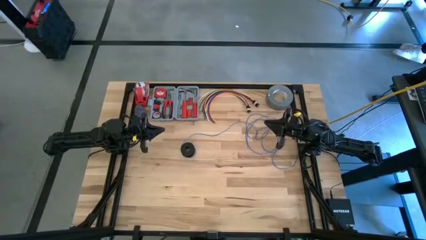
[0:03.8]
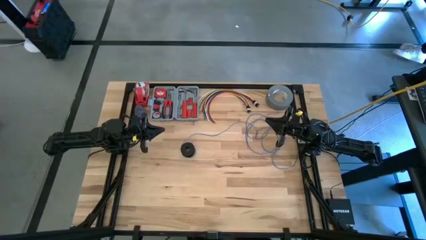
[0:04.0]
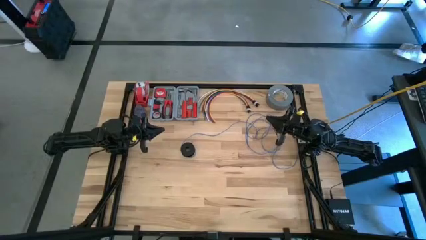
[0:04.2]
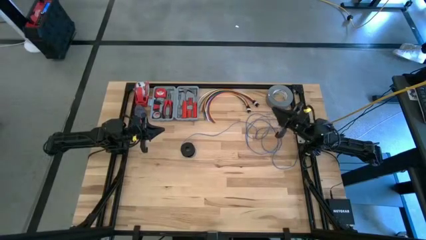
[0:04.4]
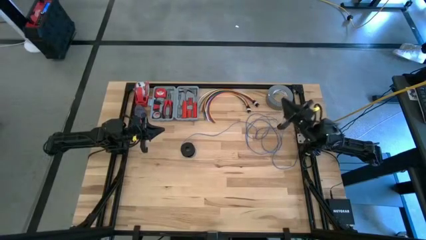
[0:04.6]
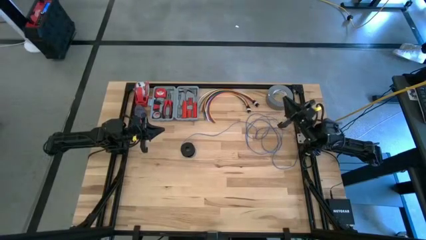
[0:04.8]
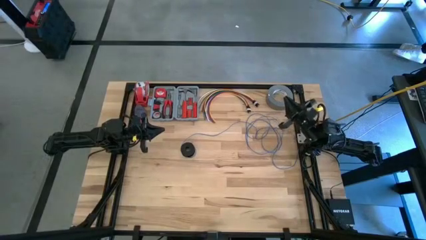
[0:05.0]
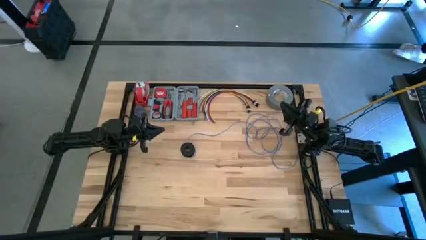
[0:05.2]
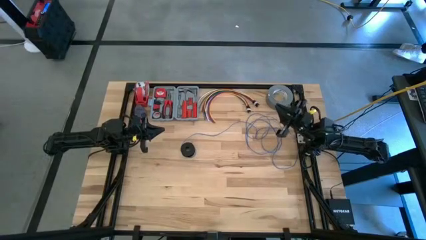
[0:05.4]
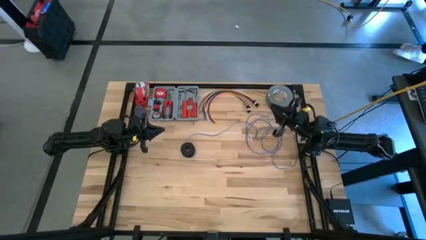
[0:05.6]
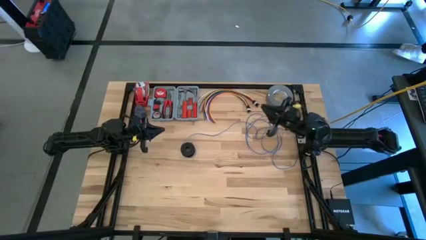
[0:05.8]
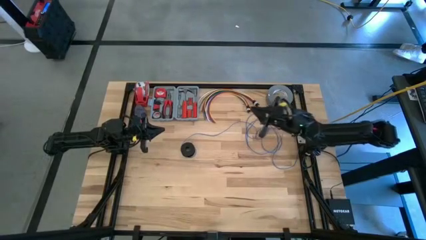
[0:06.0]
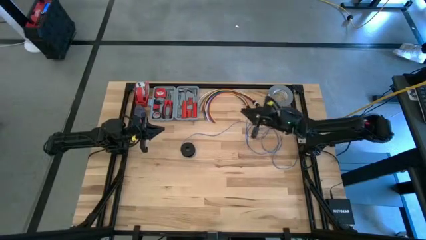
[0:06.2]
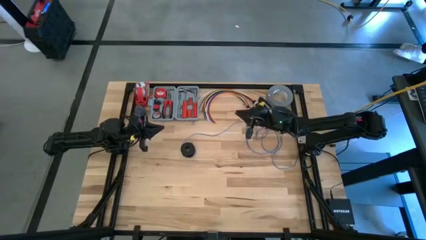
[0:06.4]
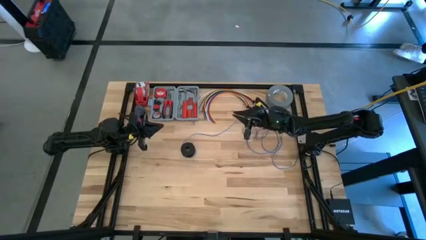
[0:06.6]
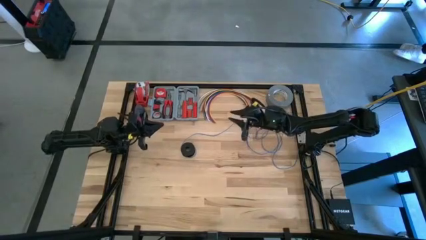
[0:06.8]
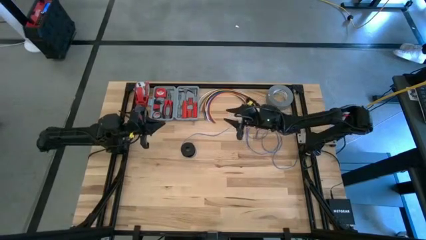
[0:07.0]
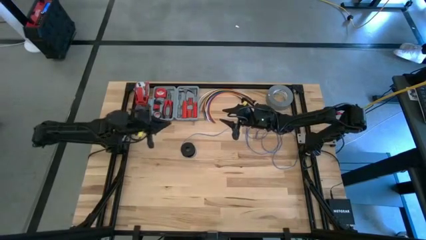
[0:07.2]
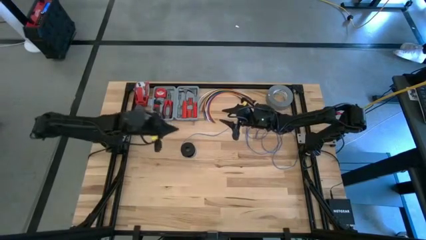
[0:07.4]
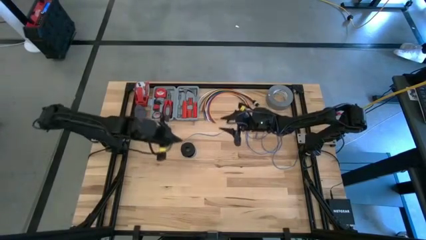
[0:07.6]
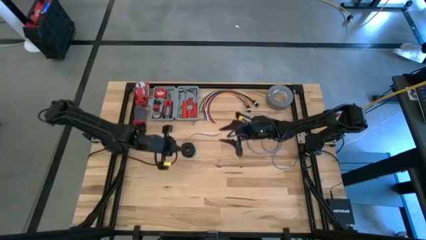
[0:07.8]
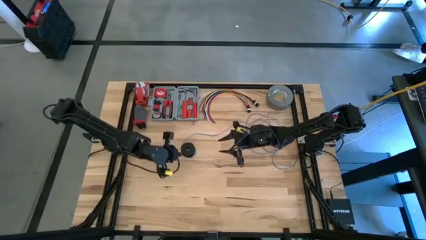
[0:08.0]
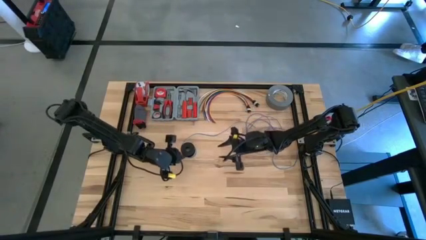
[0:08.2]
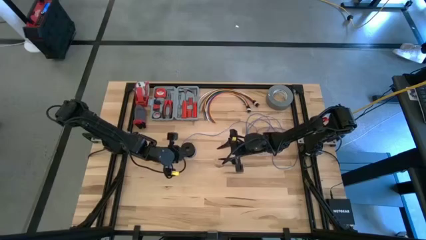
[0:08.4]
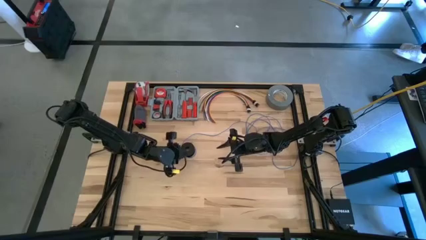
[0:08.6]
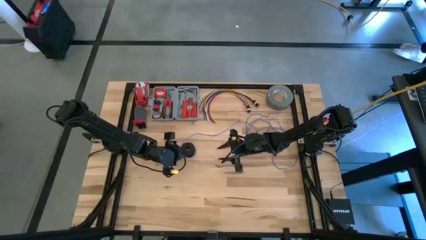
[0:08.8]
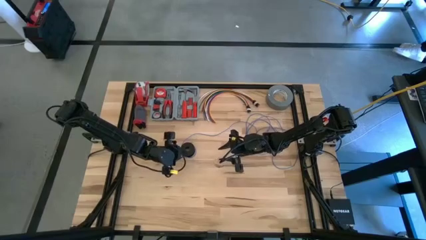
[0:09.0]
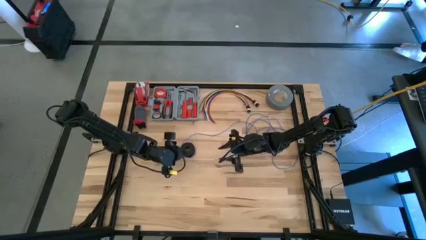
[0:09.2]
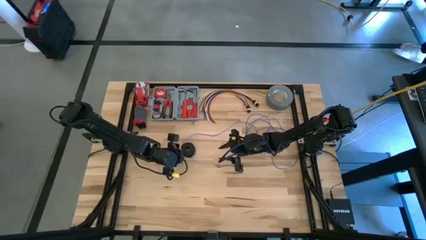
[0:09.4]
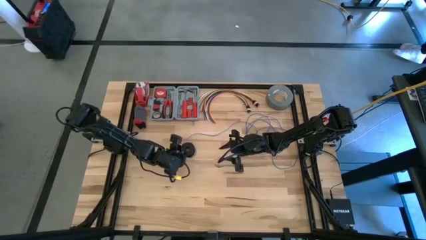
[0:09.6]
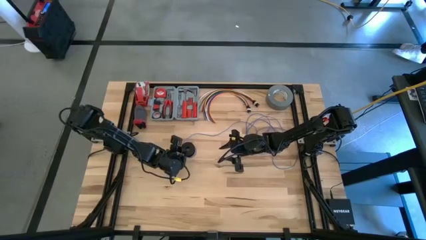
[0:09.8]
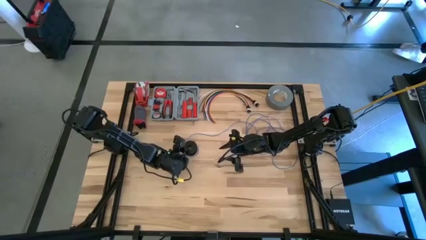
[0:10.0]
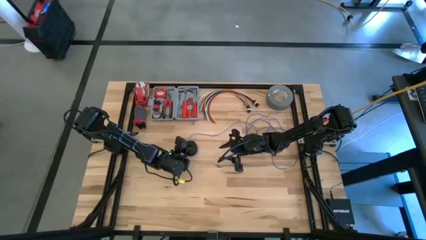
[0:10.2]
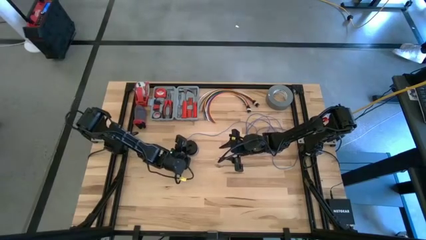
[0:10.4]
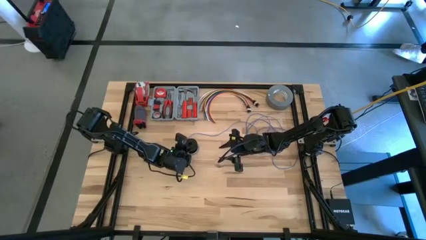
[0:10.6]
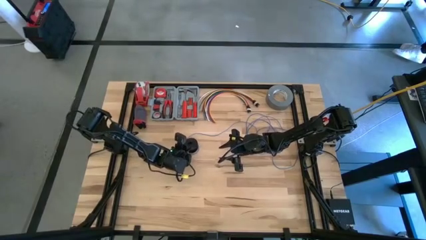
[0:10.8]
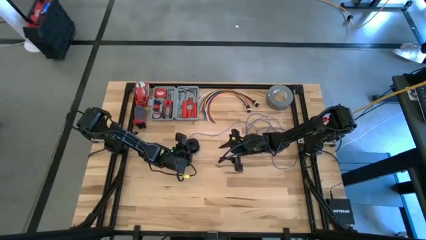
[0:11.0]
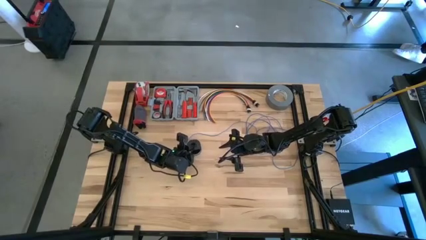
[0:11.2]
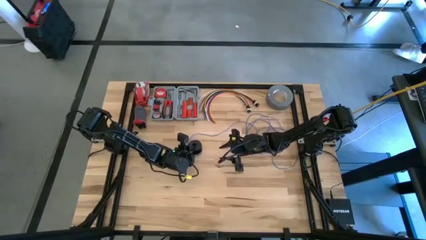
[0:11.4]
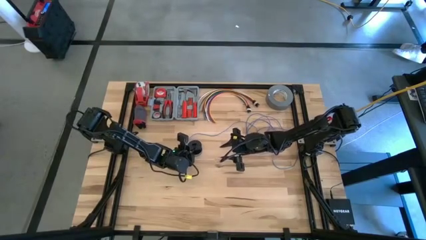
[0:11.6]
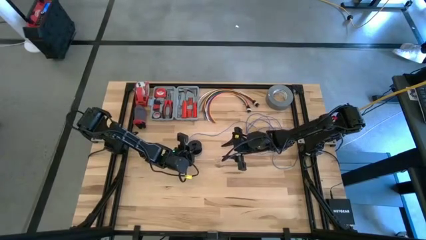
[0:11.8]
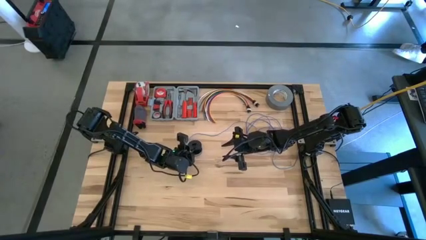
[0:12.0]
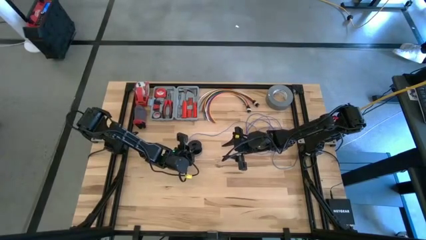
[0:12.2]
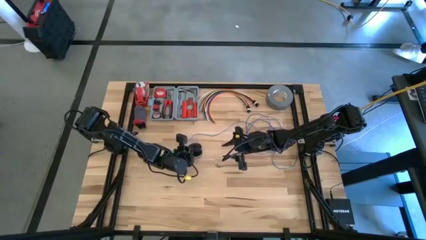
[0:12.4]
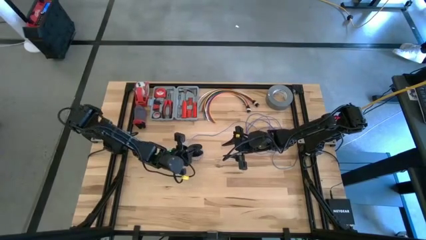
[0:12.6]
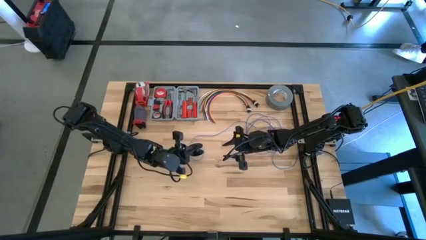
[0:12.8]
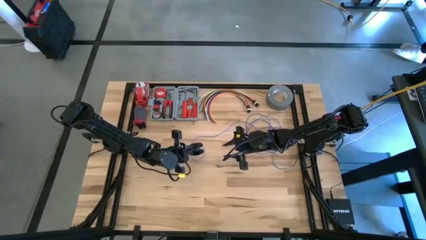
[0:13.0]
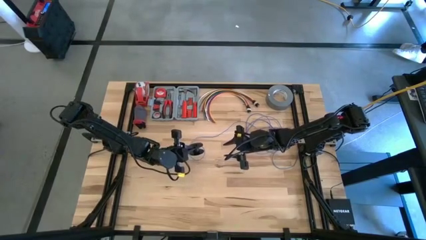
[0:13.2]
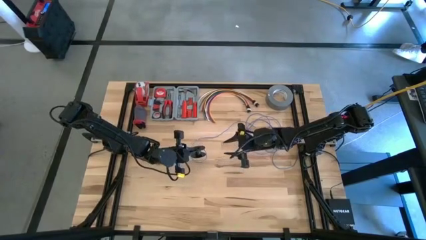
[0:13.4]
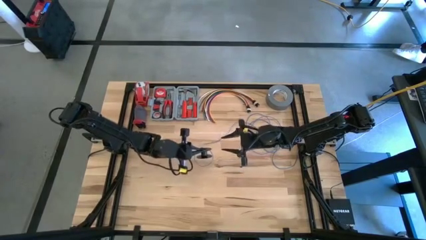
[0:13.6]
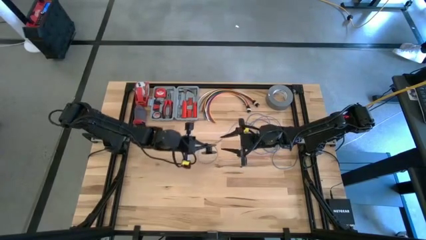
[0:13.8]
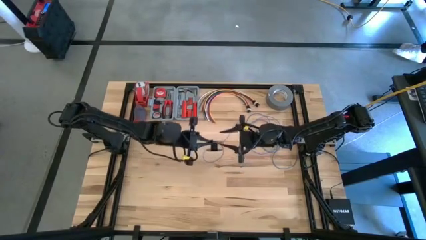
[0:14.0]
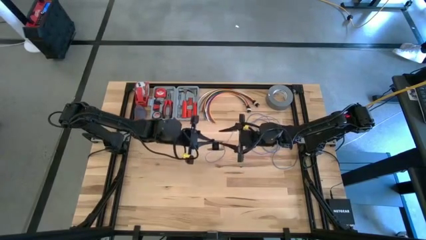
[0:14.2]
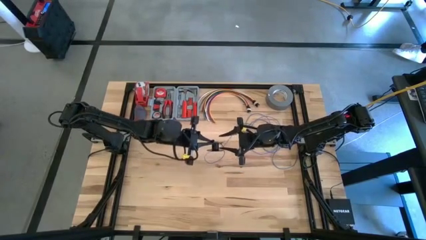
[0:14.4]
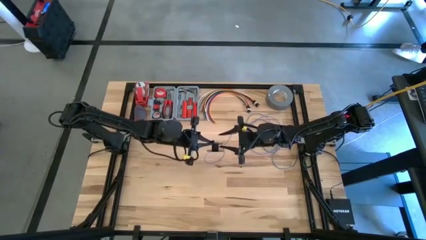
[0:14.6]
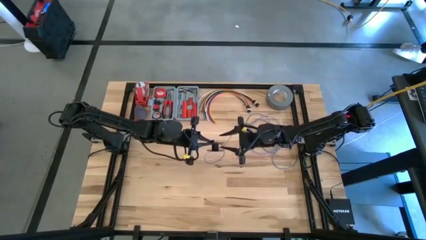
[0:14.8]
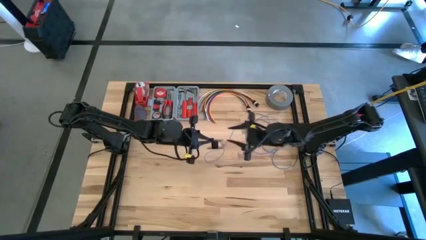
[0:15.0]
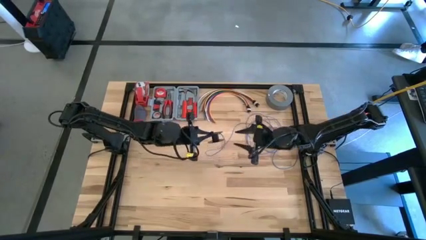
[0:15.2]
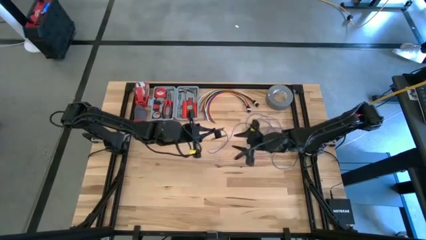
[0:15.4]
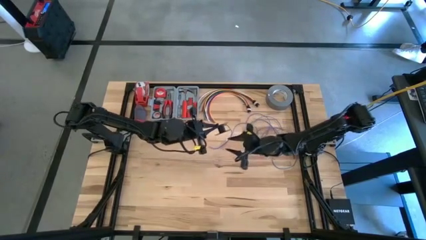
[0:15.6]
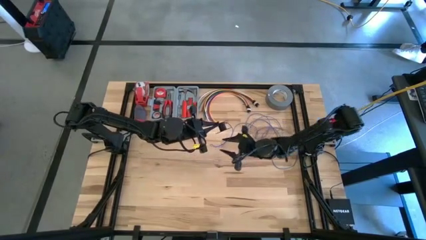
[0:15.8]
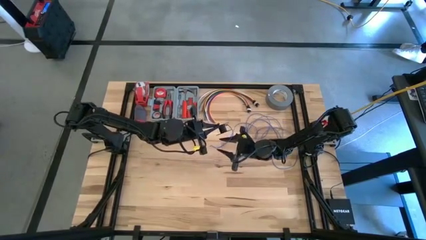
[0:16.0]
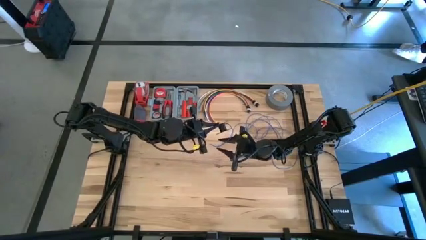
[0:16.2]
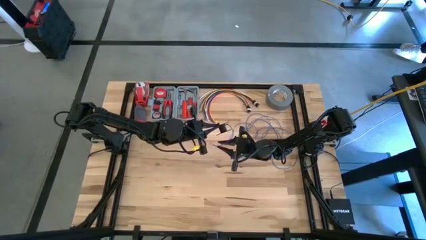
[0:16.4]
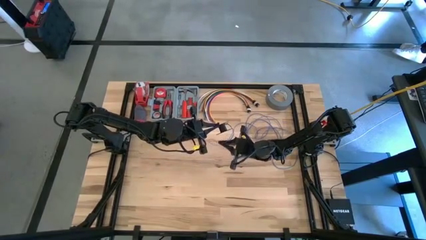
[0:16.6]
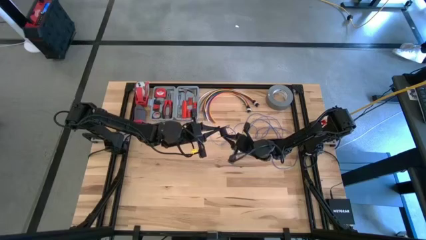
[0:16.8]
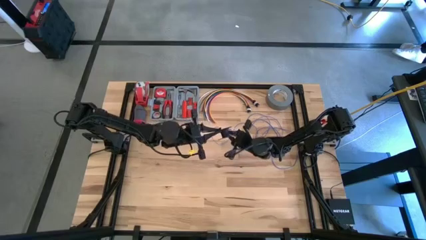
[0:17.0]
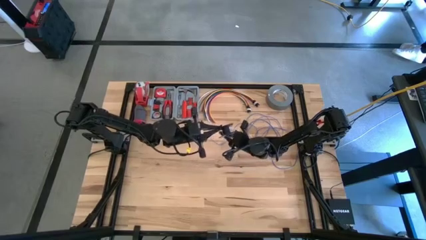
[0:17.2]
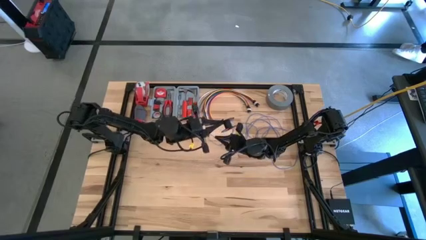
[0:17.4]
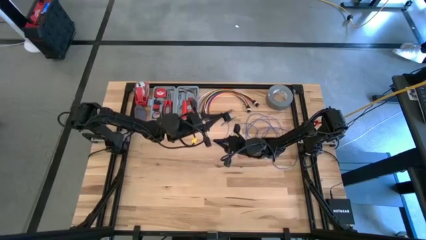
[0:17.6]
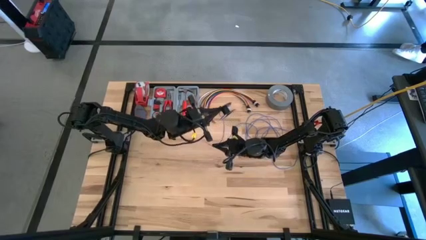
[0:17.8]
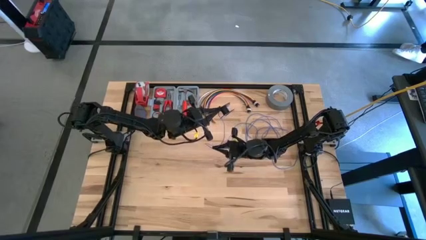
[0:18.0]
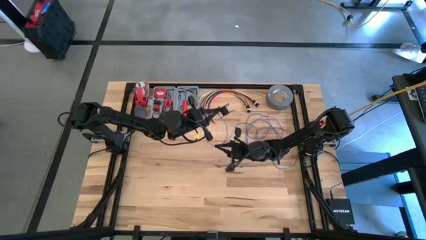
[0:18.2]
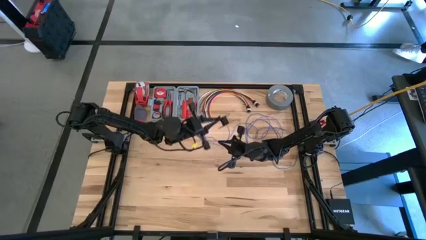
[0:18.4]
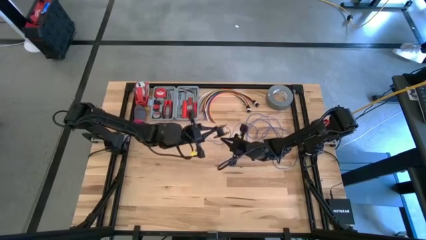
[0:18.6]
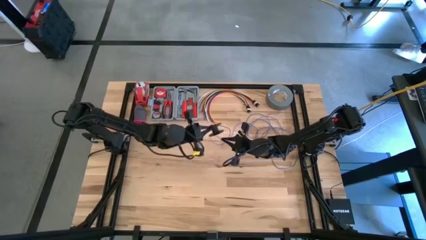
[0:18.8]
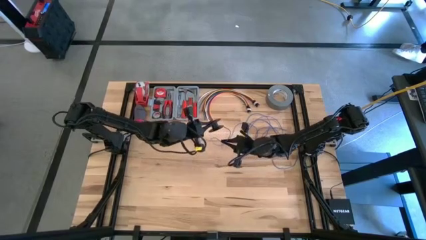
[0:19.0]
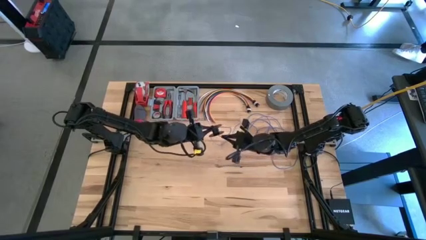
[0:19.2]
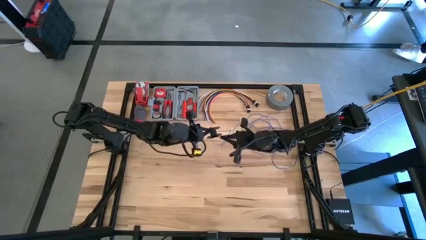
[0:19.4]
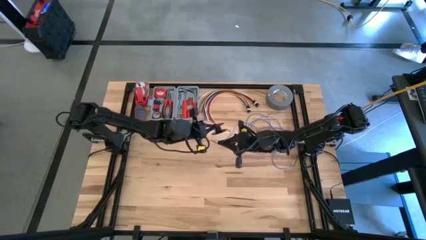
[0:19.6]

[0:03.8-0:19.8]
Task: Coil cords
Coil the blue wire onto the black spool
